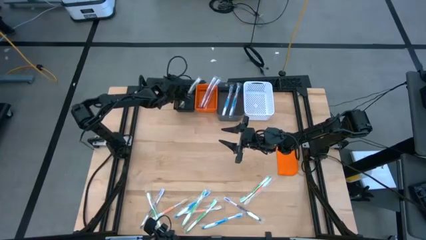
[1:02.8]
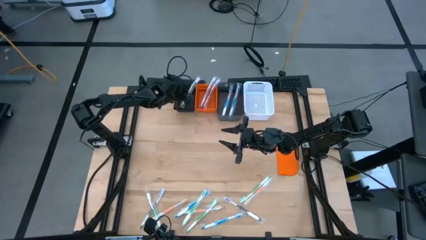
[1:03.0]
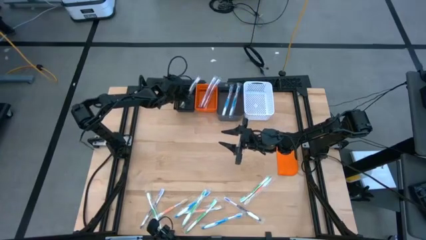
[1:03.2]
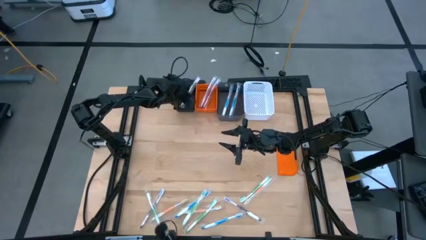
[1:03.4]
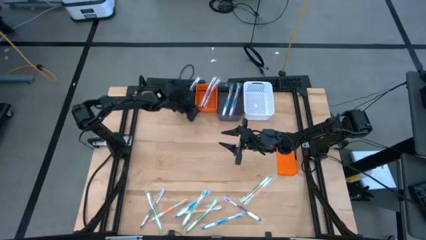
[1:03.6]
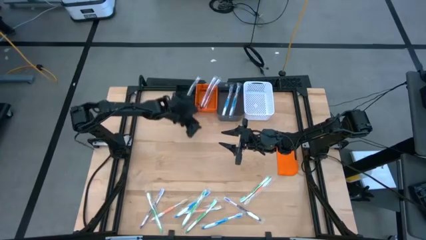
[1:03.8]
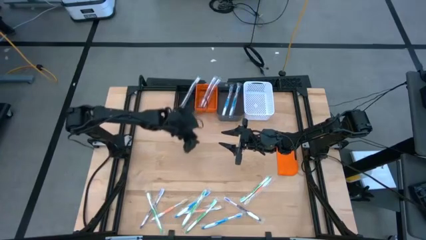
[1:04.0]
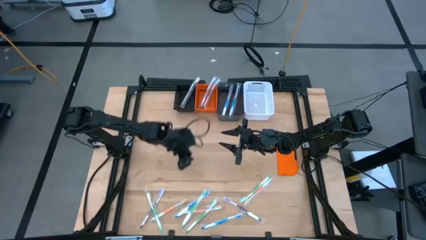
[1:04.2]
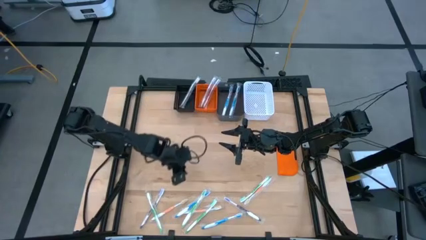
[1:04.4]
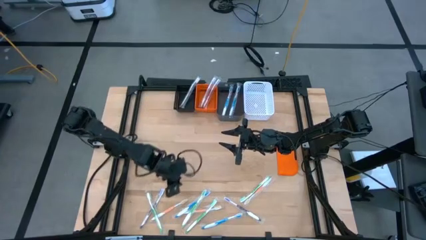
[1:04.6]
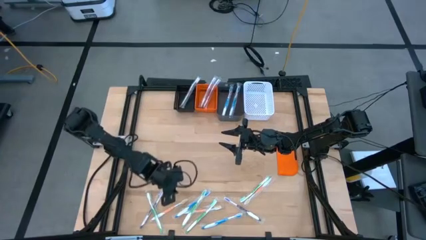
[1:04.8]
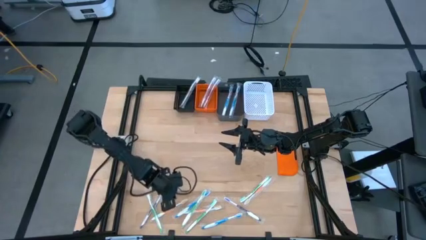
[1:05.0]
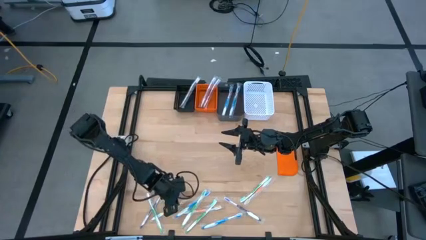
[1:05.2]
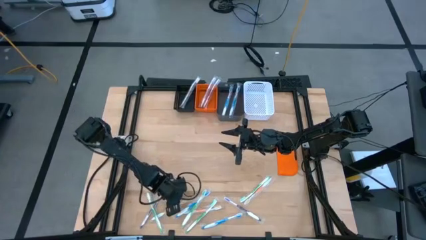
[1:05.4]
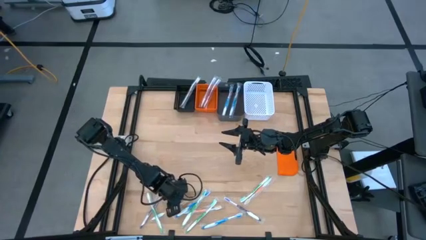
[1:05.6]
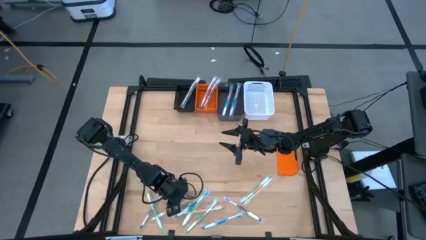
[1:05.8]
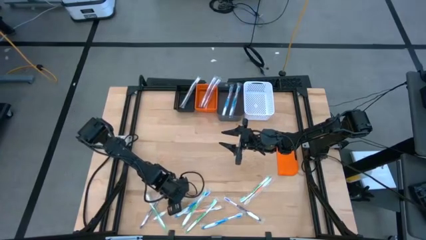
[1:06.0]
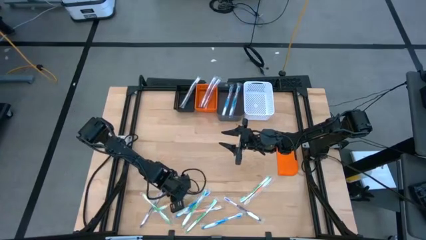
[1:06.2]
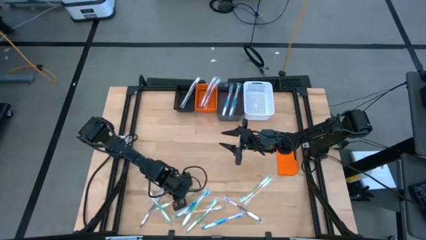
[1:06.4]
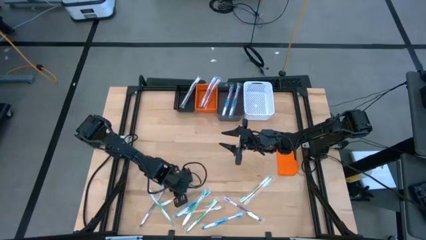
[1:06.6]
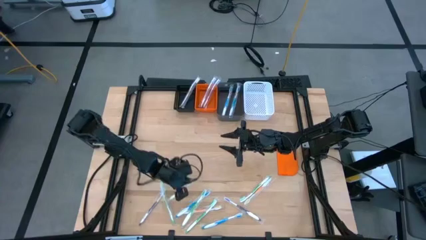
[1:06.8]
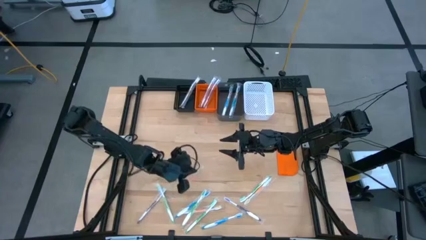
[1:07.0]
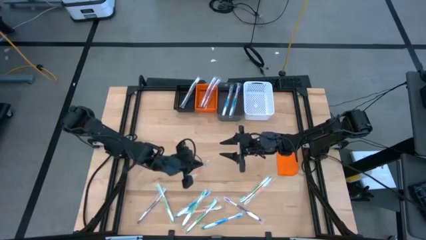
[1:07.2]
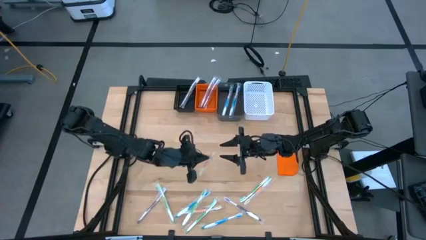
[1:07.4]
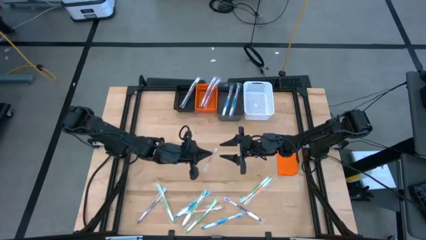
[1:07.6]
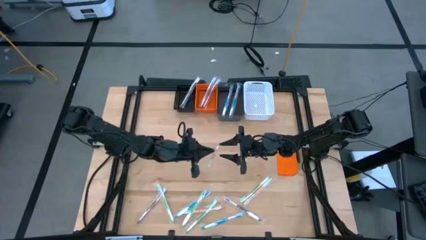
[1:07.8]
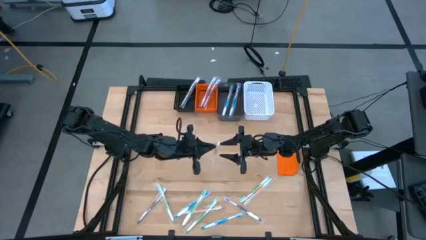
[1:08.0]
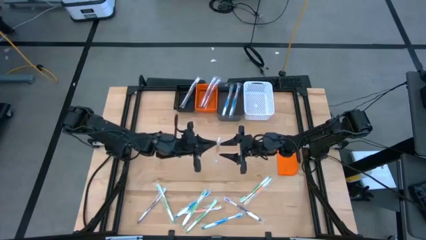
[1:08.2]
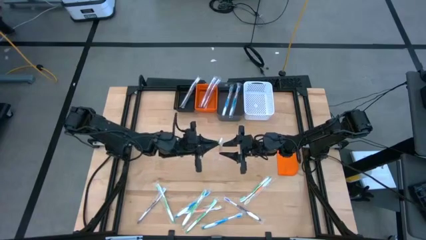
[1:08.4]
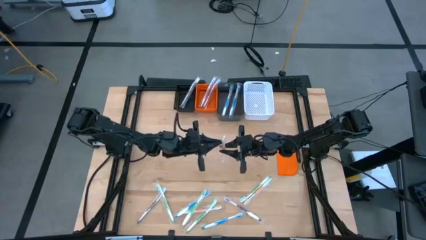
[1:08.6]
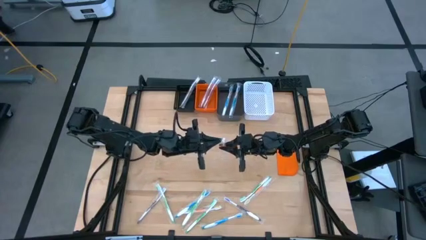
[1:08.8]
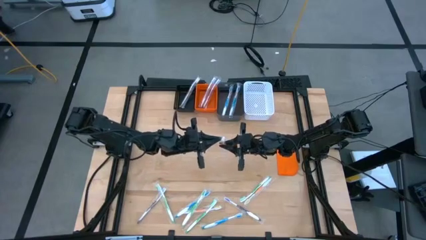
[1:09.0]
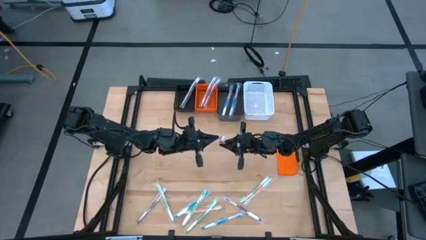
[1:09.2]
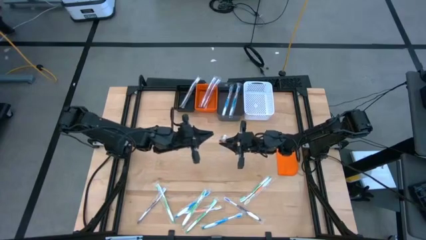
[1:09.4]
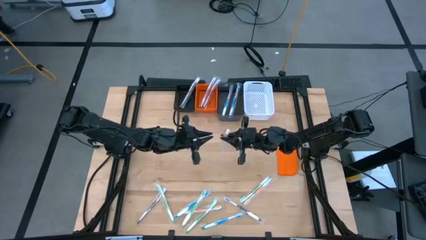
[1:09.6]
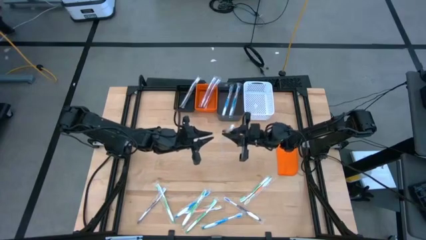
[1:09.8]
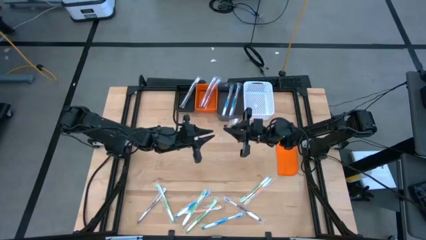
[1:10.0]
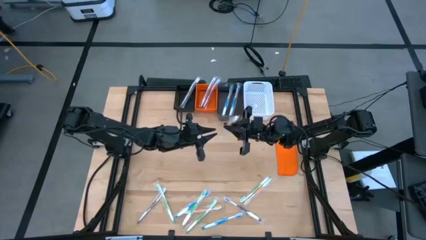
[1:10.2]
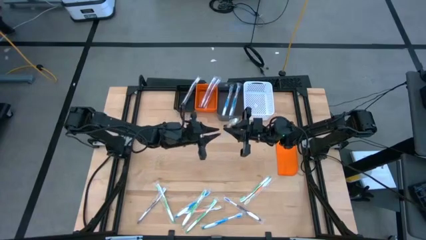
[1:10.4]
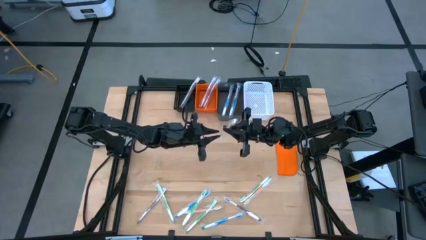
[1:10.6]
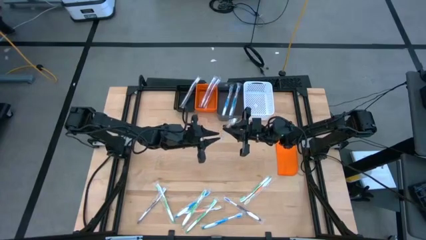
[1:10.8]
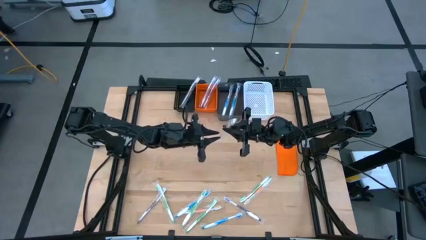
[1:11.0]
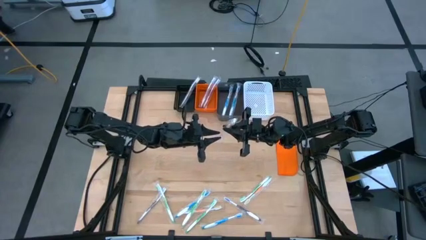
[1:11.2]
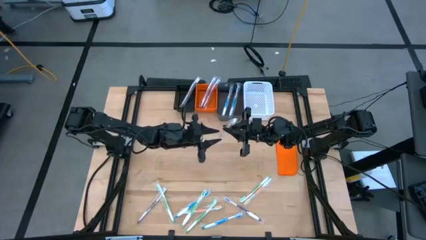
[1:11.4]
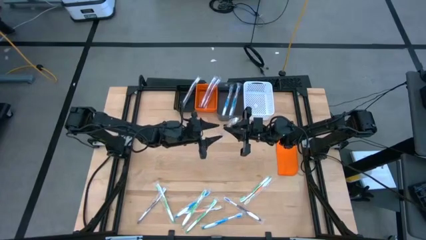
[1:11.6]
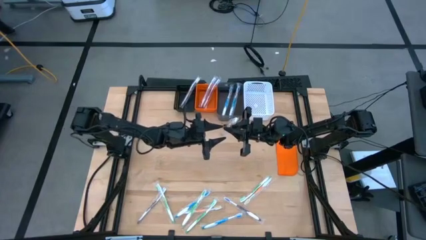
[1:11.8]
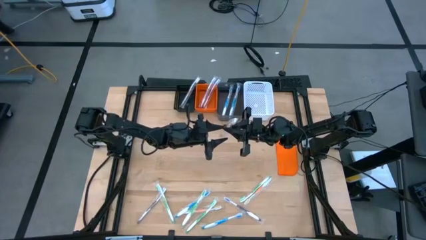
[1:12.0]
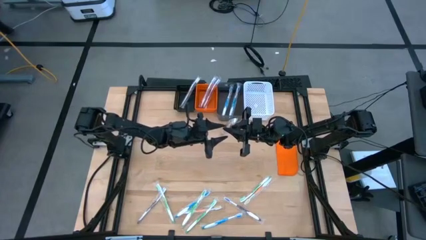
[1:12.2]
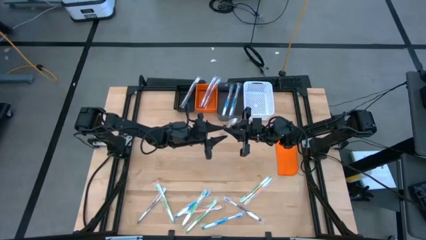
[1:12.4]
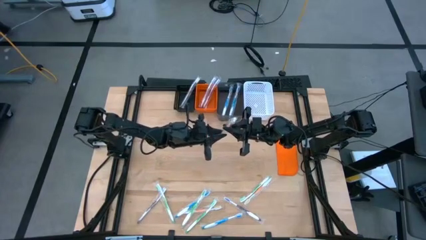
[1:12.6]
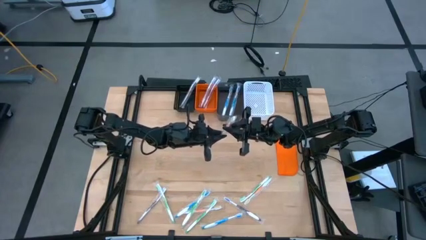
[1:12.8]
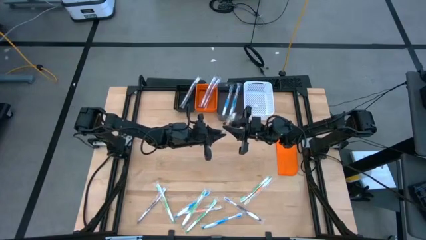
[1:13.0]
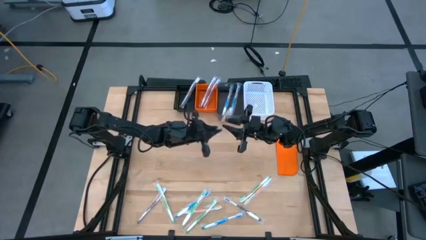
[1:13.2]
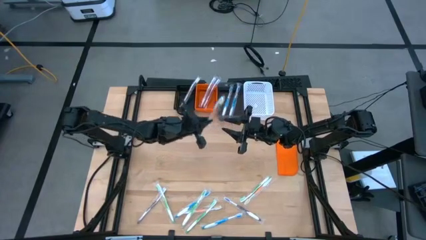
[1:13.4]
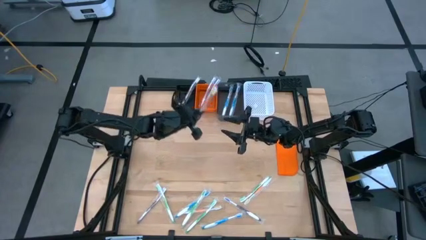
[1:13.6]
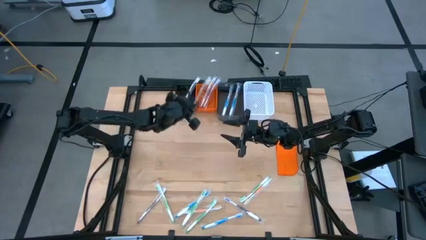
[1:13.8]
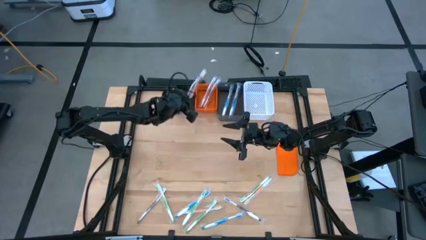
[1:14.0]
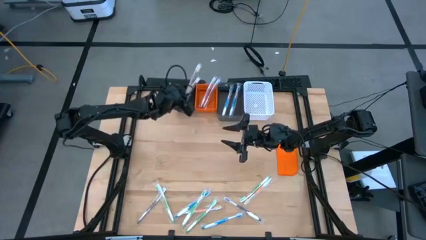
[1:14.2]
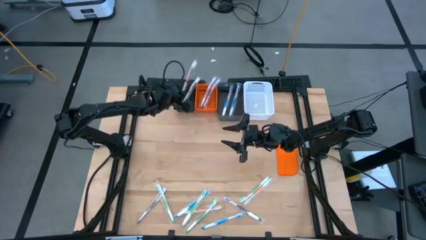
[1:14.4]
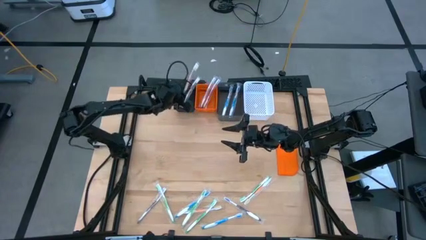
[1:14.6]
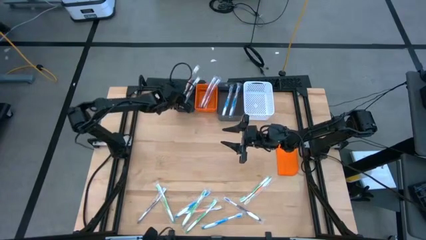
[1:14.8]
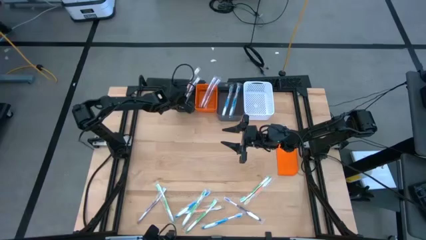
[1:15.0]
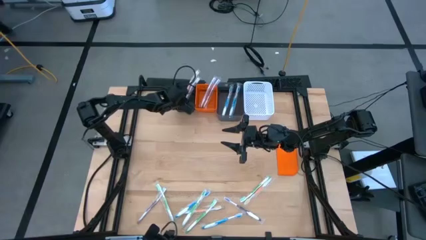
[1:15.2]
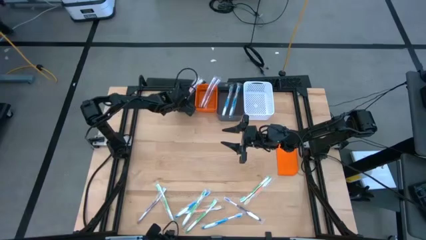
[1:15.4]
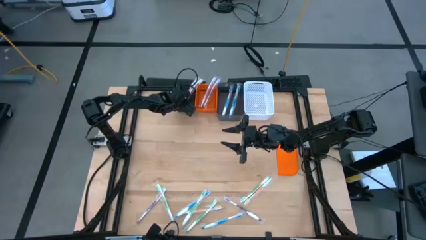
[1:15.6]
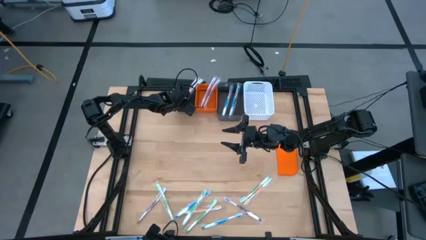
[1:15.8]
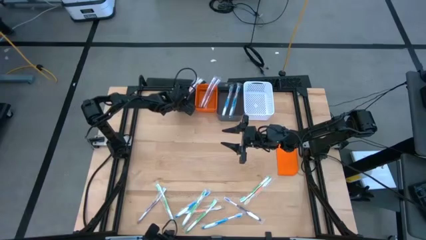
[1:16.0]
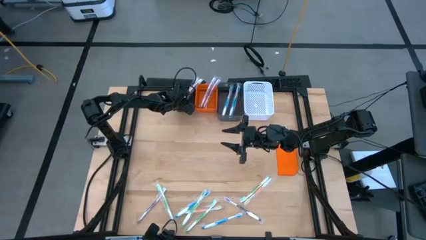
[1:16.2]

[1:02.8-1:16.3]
Task: Pick & Place Toothbrushes
Put the orange toothbrush into the black bin

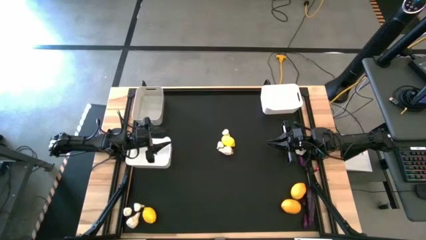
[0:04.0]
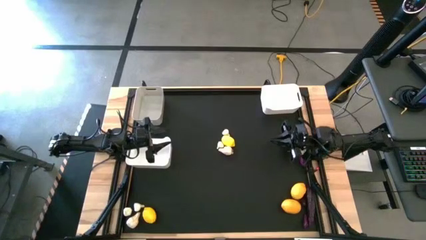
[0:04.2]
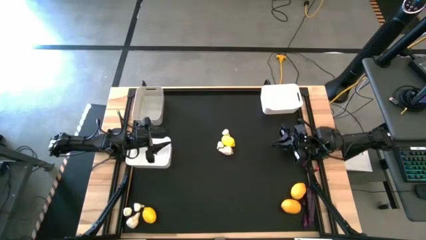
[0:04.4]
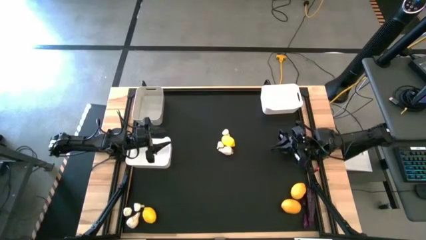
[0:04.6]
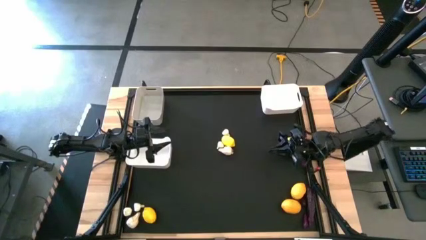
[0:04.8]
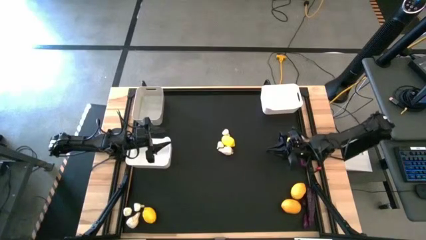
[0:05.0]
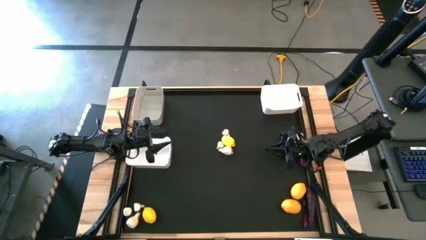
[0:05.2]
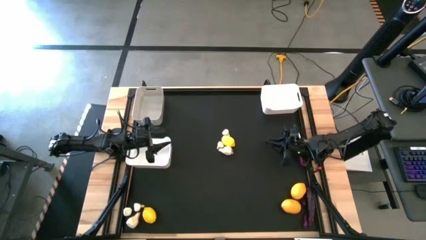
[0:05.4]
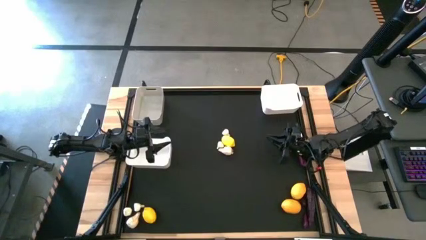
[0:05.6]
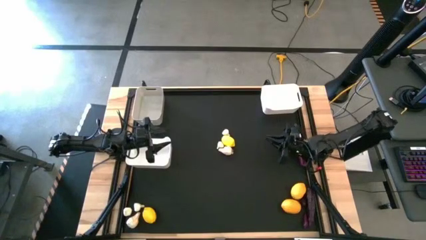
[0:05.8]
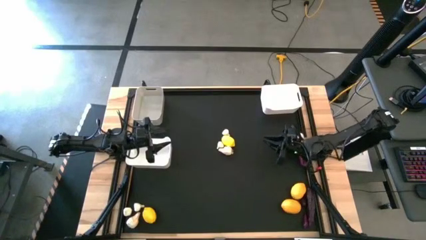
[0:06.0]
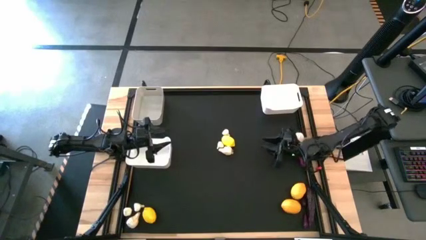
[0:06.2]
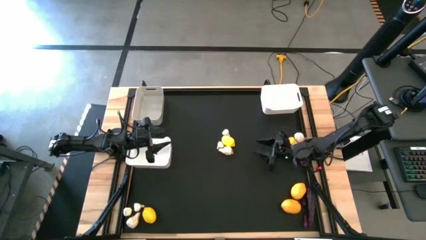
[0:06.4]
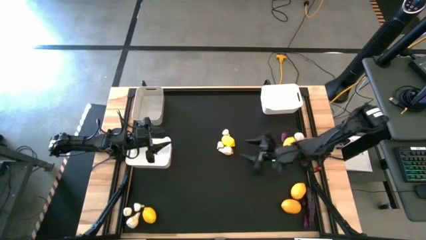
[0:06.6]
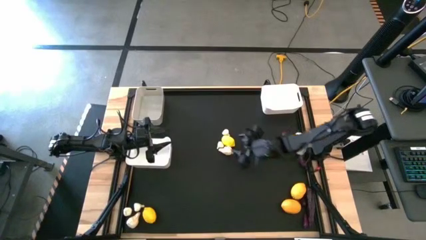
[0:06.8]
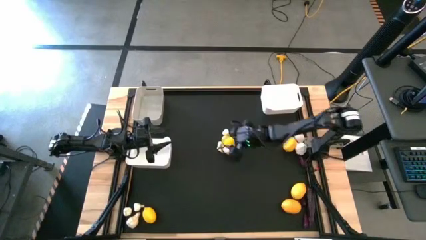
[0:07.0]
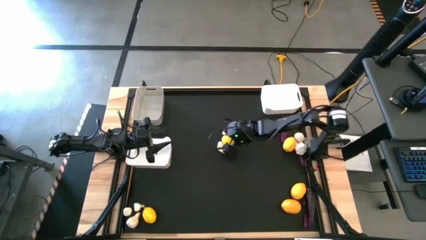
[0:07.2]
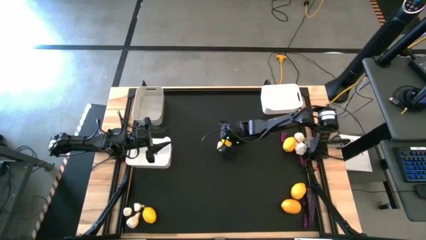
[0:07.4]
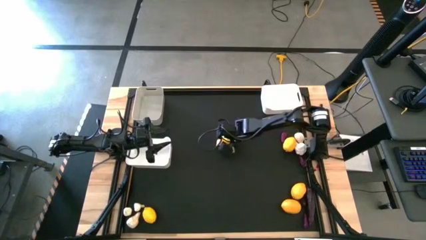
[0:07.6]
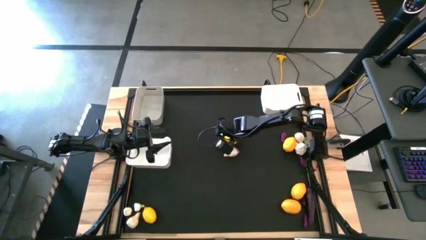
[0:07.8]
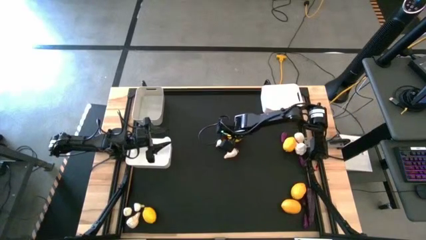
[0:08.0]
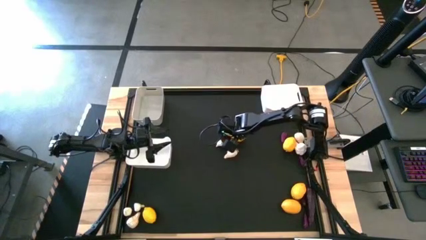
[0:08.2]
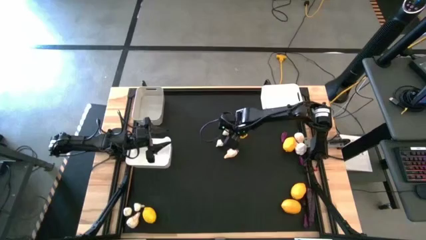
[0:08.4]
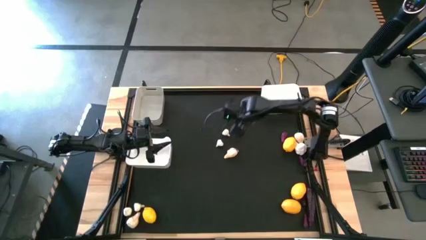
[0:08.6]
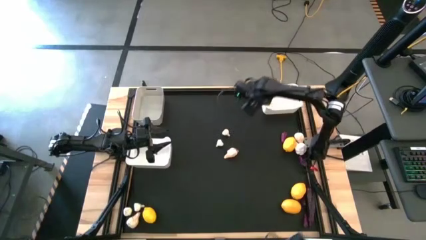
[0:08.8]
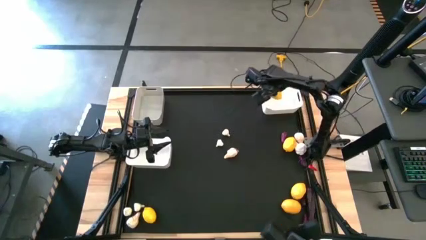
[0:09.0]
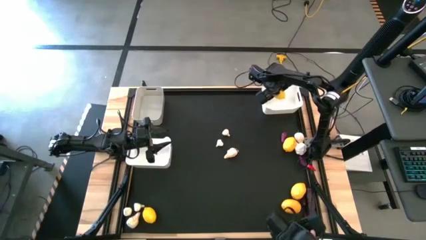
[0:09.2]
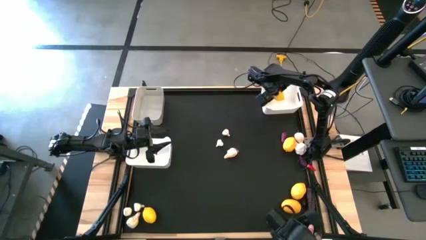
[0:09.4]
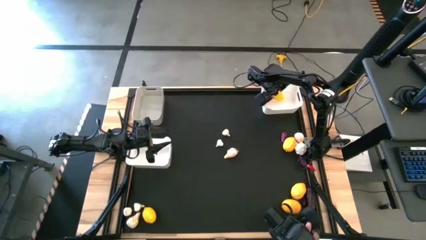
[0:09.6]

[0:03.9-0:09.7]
Task: Sort produce into baskets
Put the yellow lemon into the top white bin
